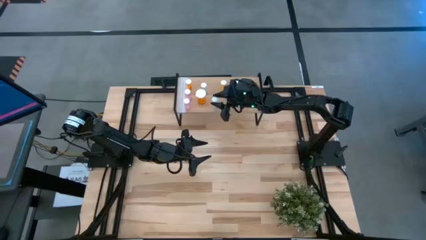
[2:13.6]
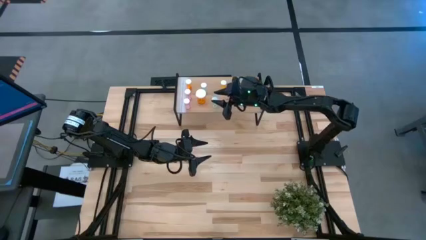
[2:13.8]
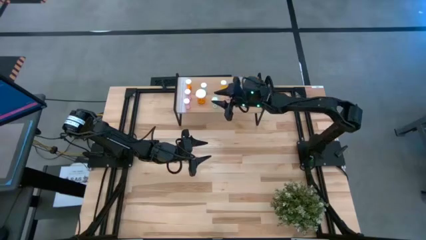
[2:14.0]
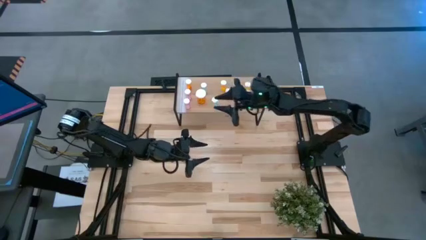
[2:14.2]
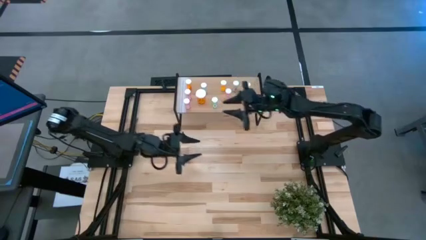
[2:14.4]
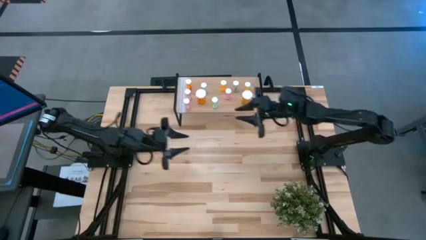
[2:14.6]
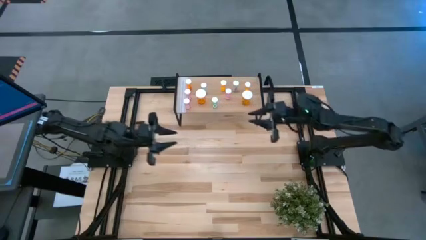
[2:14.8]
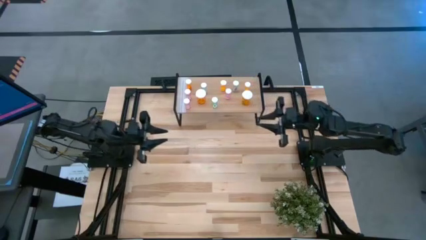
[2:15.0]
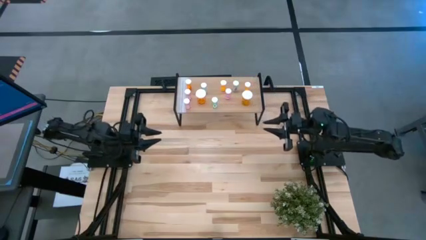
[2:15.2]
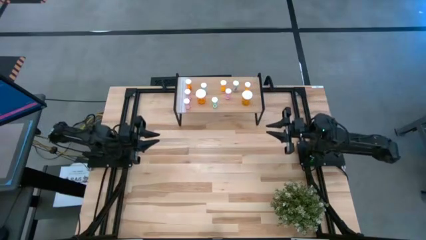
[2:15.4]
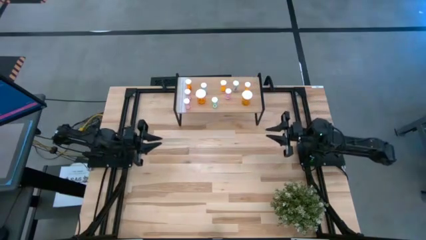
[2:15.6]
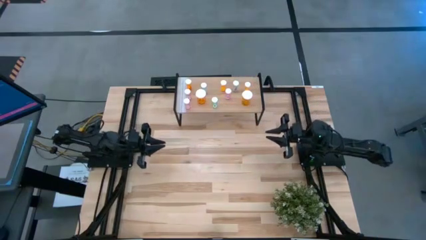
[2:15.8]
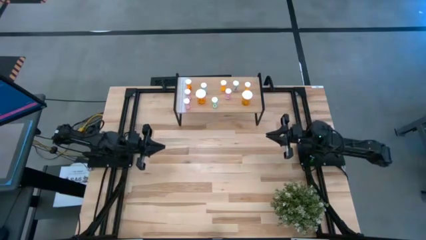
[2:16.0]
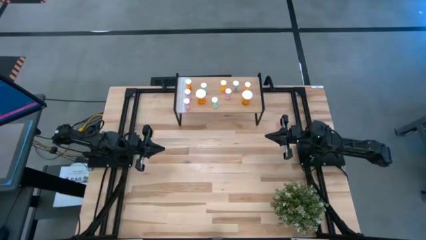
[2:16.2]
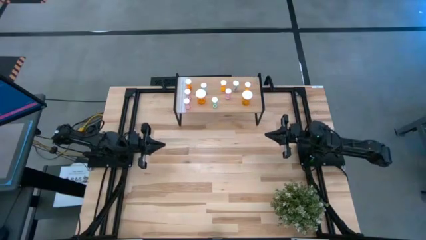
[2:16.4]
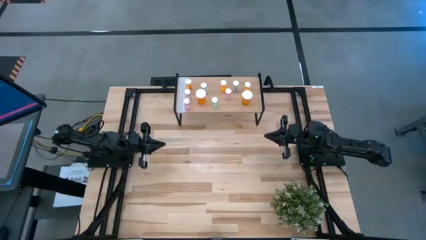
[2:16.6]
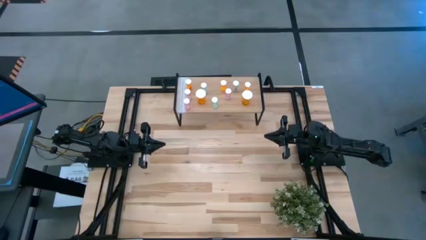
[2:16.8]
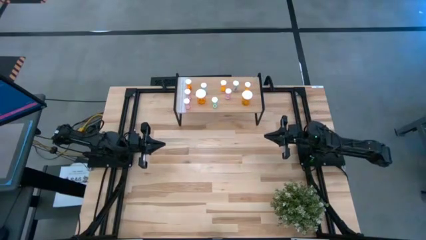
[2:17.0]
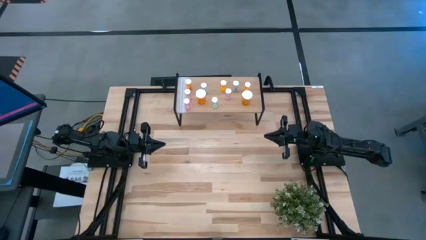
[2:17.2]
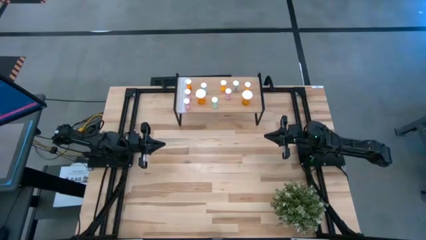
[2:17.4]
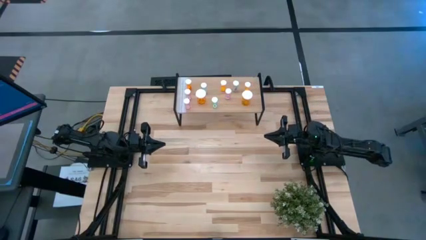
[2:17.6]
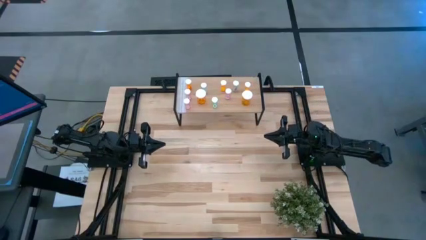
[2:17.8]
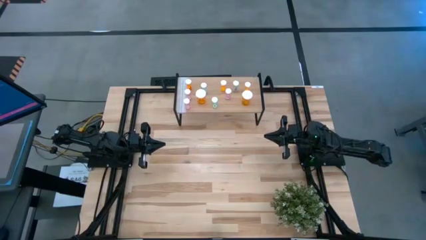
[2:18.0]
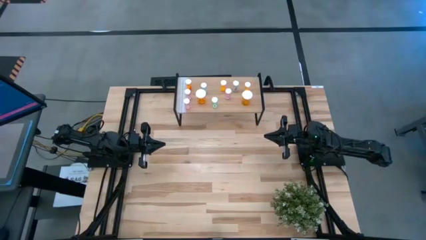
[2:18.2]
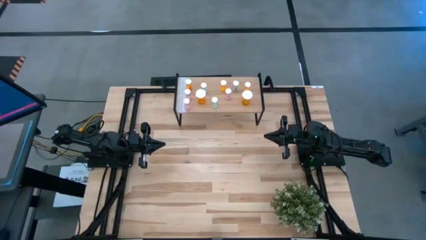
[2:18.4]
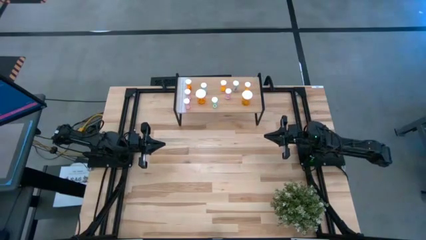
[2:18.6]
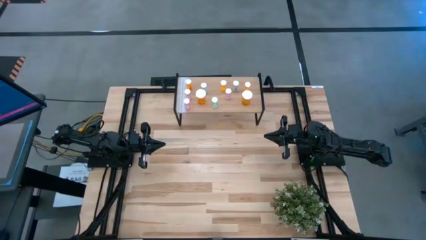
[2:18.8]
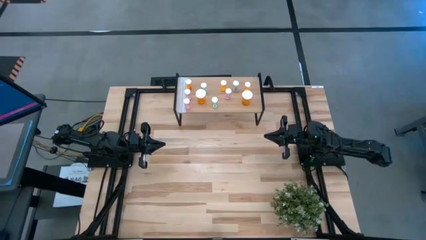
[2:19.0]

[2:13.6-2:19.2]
Task: Pick and place medicine bottles onto shelf by color
Return to Home Position

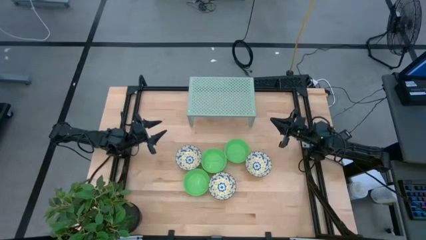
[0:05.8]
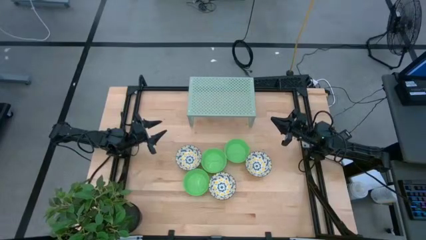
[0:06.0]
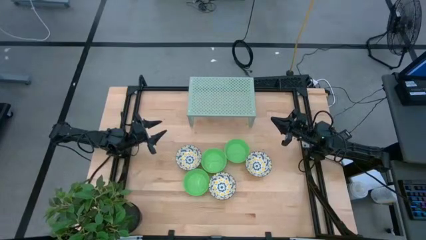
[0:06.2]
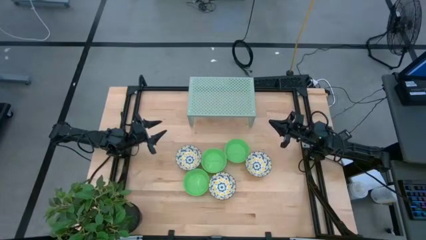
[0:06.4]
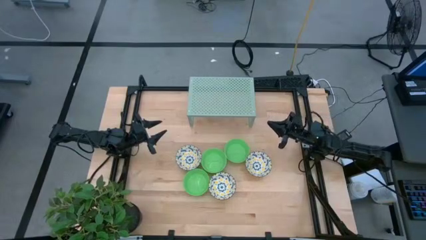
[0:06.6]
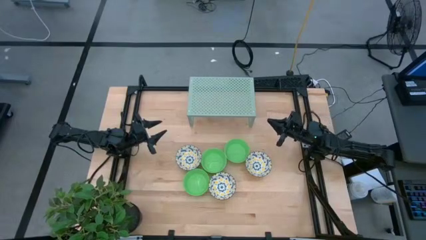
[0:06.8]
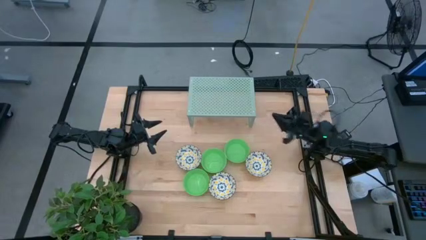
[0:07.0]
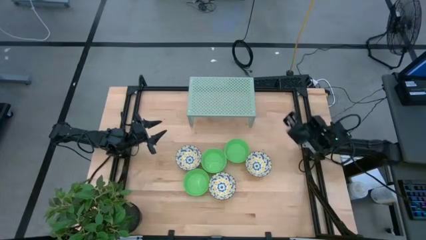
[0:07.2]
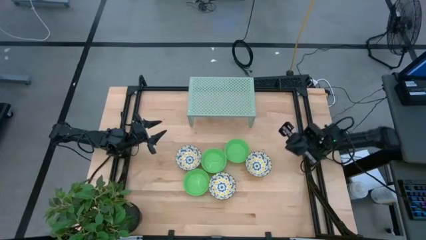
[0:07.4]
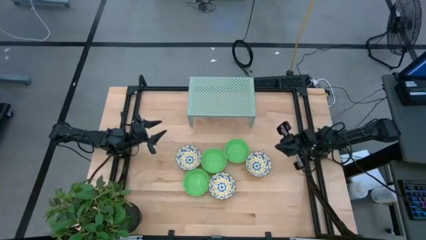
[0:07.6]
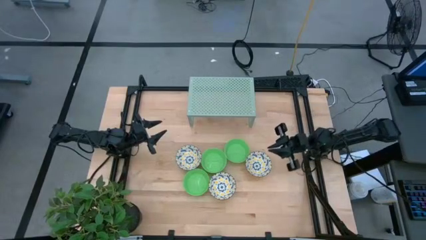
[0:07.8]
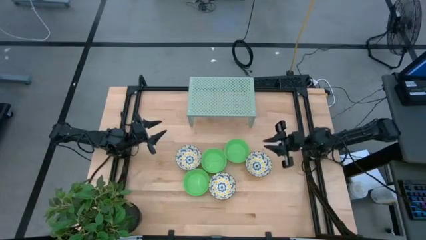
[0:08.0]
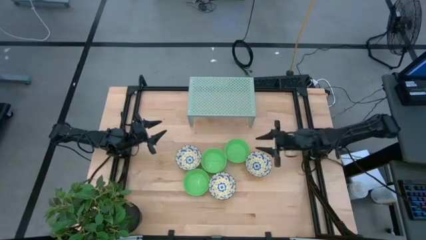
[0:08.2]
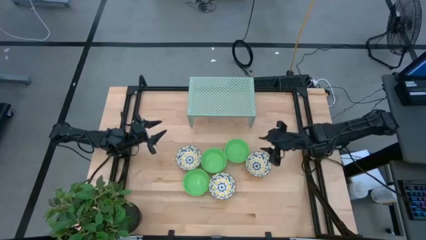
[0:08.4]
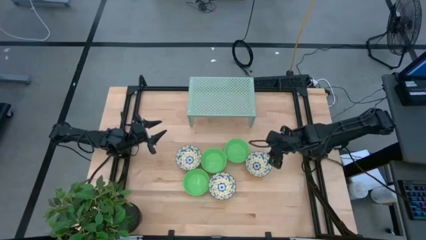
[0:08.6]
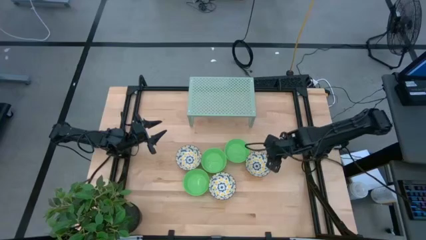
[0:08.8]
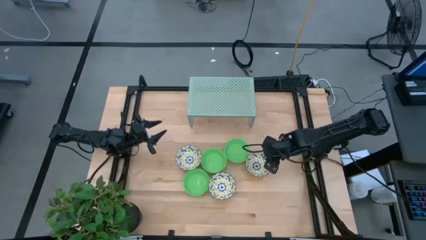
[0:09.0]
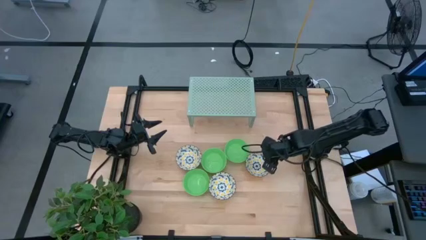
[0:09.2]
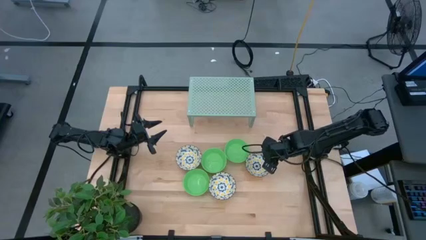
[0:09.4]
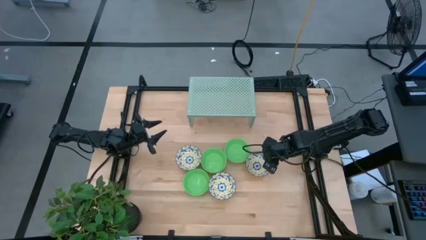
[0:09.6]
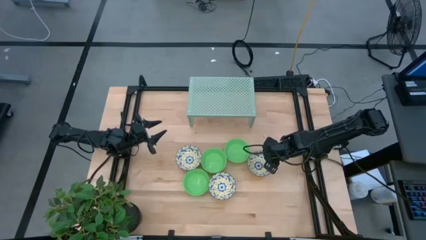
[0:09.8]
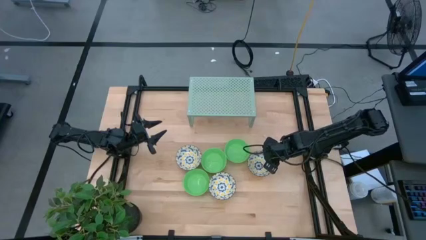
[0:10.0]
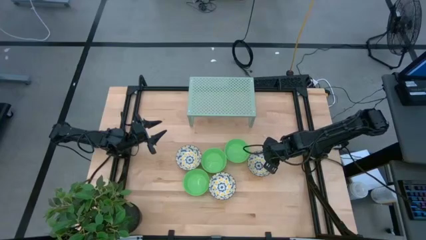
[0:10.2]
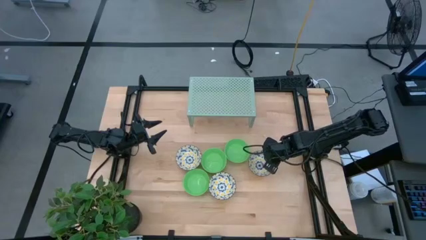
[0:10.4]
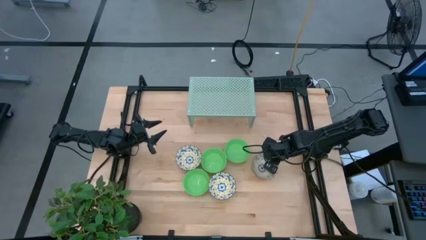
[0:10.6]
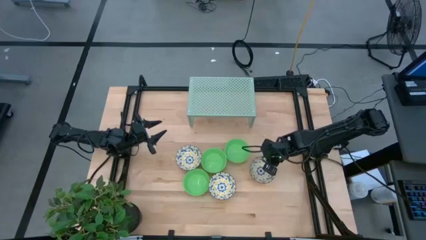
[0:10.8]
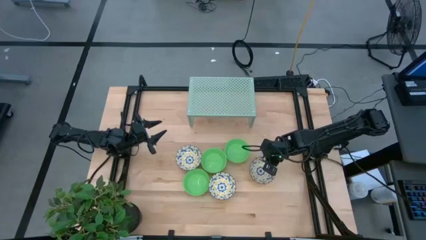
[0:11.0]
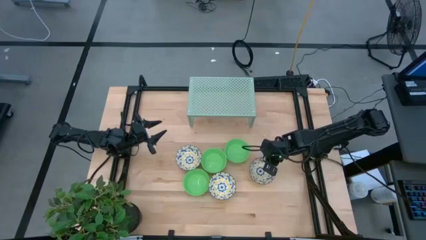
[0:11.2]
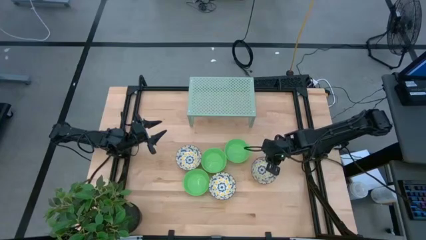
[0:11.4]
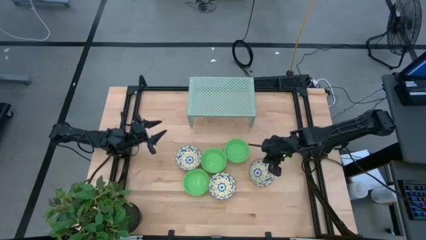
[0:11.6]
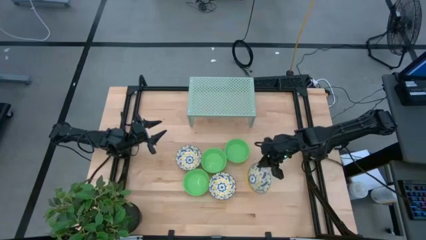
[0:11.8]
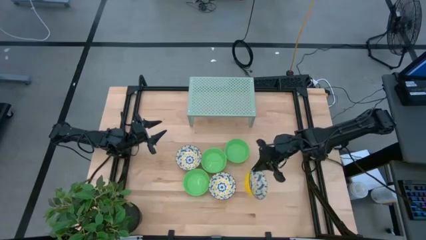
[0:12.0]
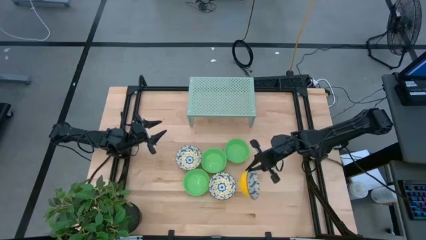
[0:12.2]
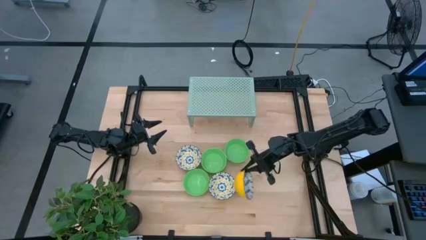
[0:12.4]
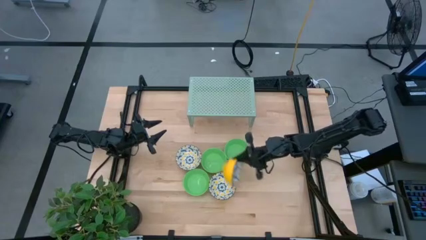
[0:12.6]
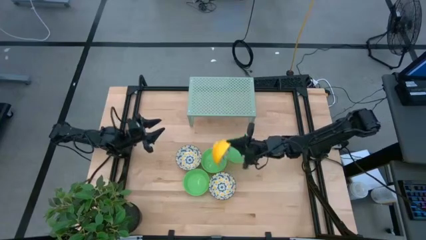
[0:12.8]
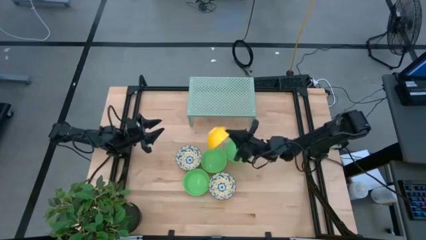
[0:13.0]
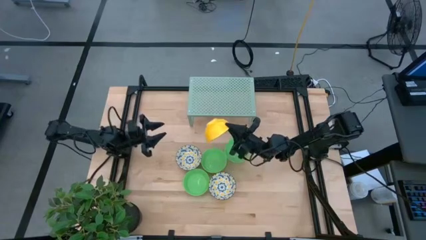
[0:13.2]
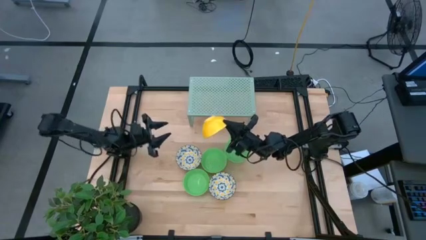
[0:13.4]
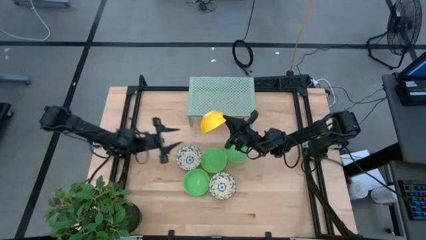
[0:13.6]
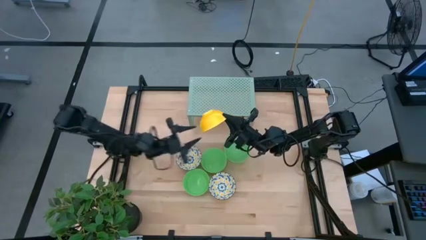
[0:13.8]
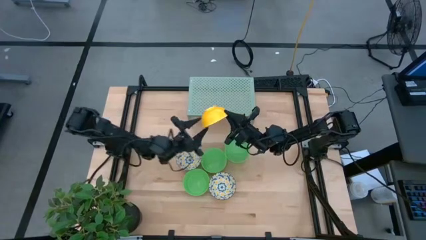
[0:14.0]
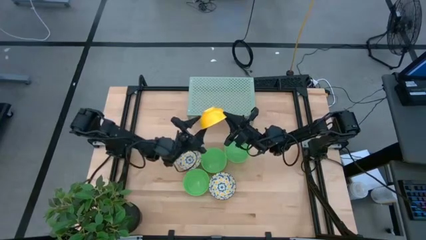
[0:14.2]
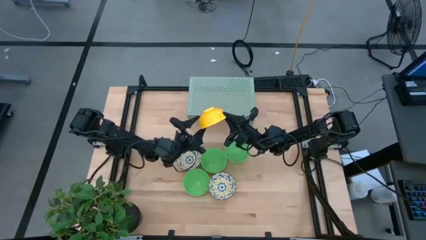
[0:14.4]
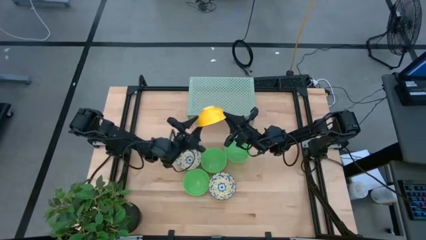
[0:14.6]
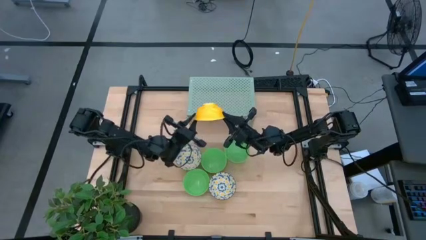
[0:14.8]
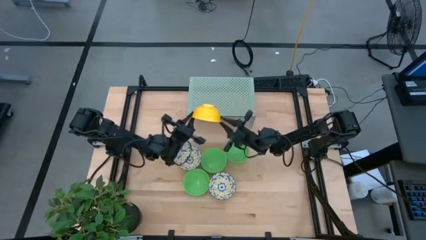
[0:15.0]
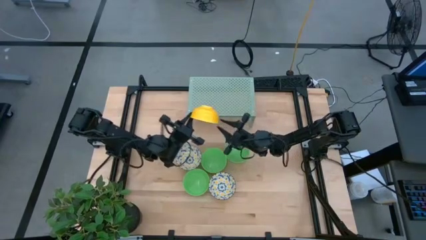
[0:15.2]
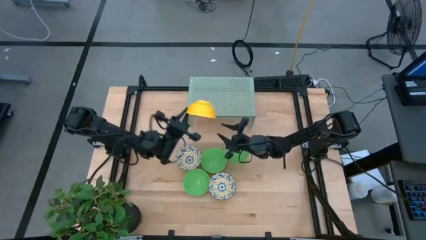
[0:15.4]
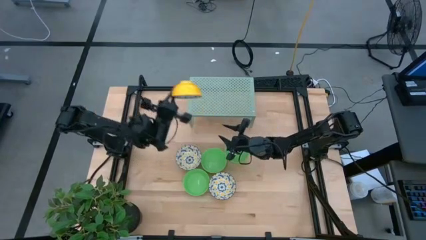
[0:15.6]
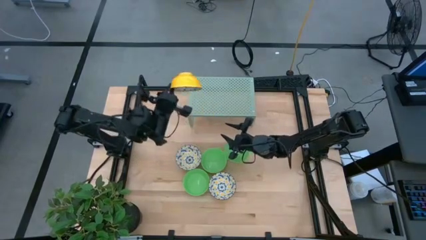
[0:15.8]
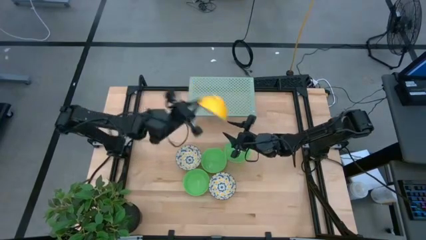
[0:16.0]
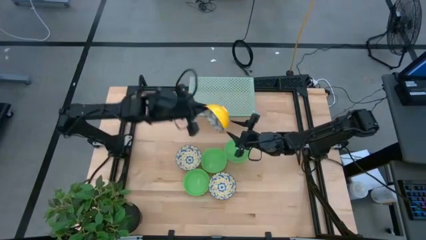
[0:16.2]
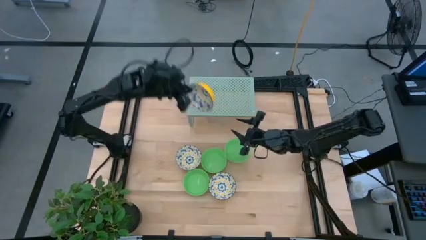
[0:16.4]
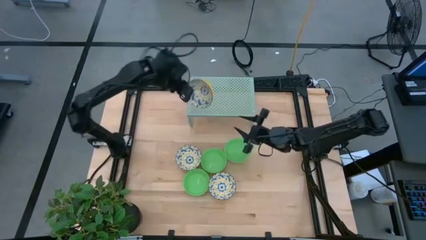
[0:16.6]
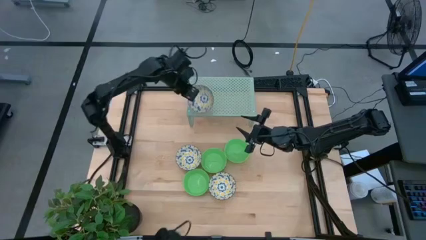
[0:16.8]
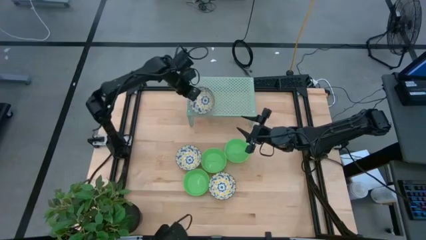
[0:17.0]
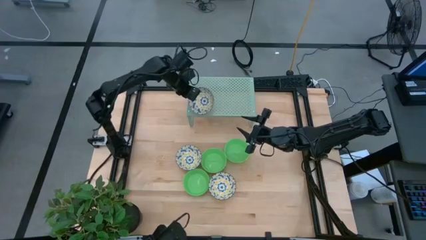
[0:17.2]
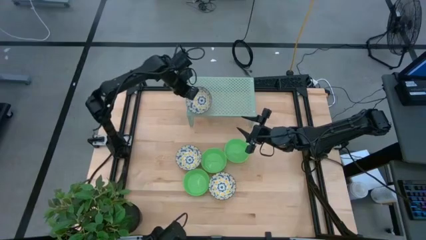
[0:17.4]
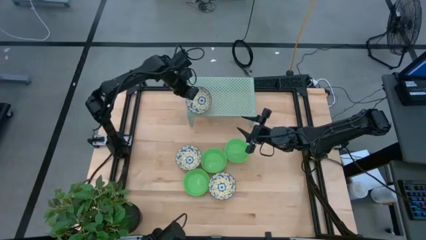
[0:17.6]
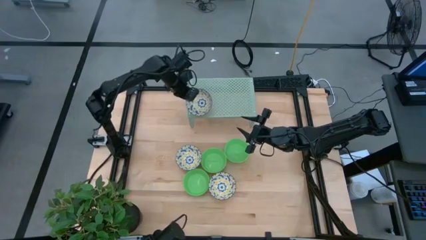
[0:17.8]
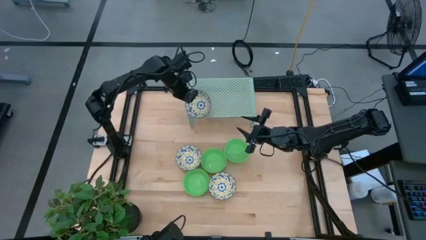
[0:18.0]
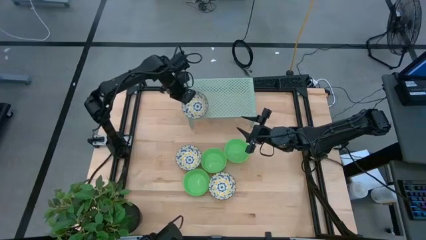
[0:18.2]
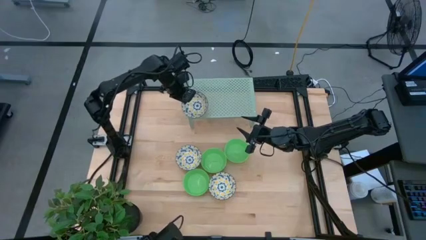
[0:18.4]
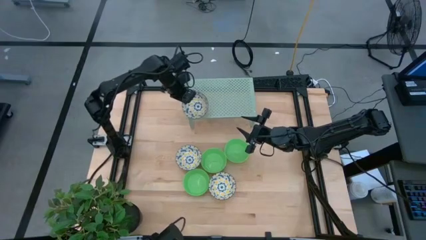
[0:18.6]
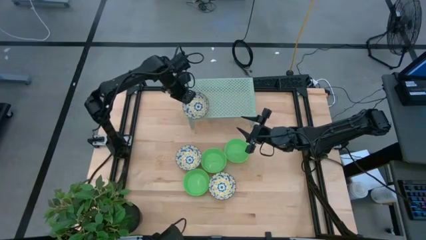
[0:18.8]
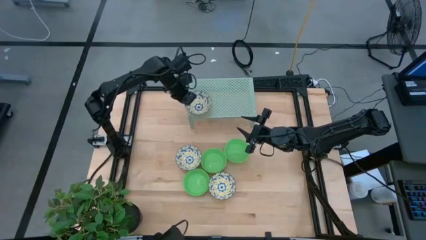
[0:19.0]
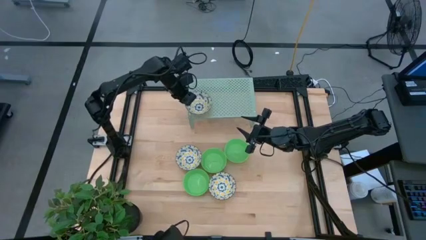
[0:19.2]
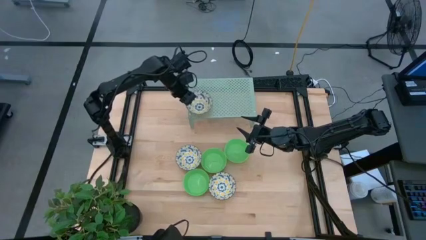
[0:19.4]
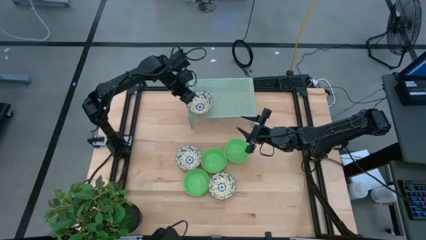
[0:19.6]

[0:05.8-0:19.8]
Task: Pick & Place Mini bowls
Put the top right white patterned bowl on the shelf
